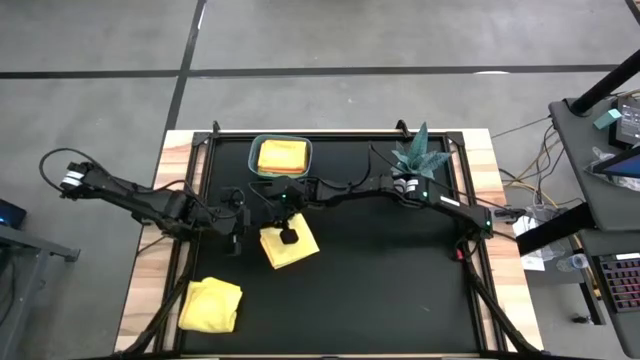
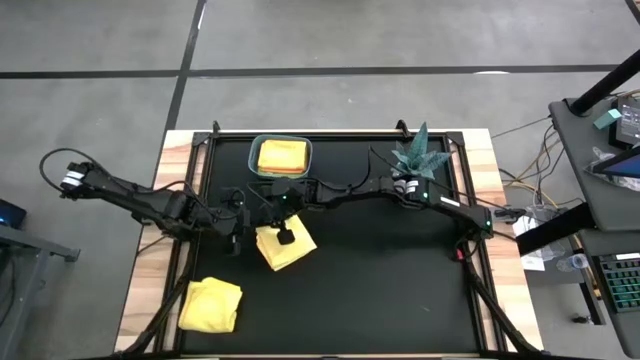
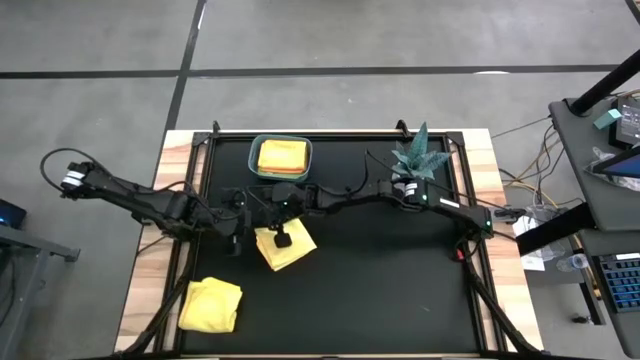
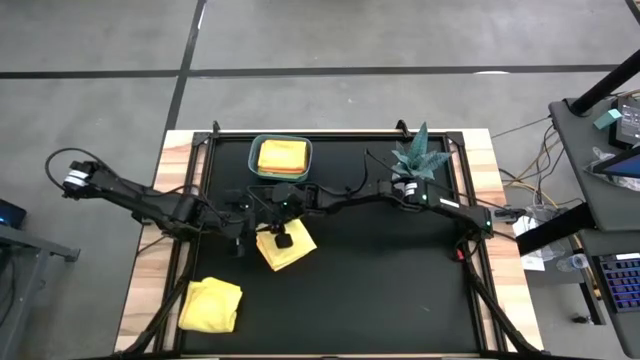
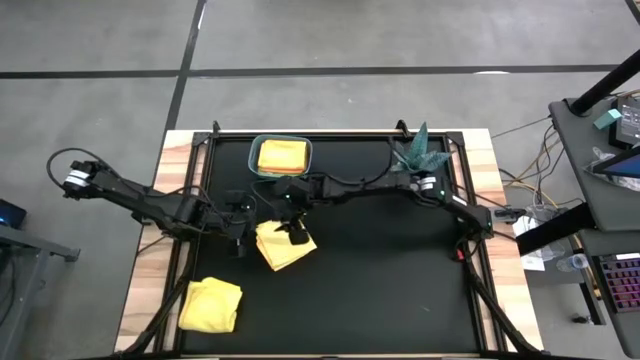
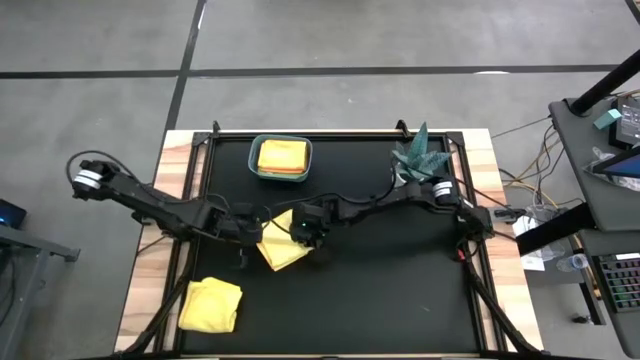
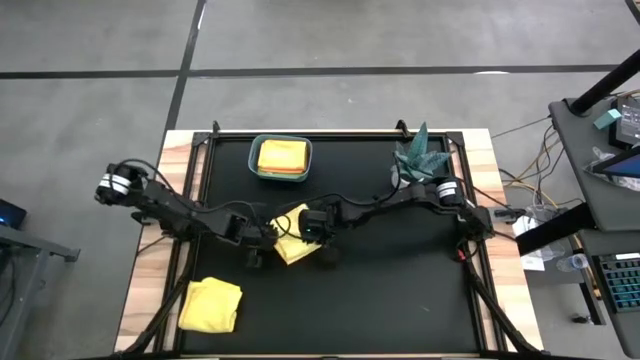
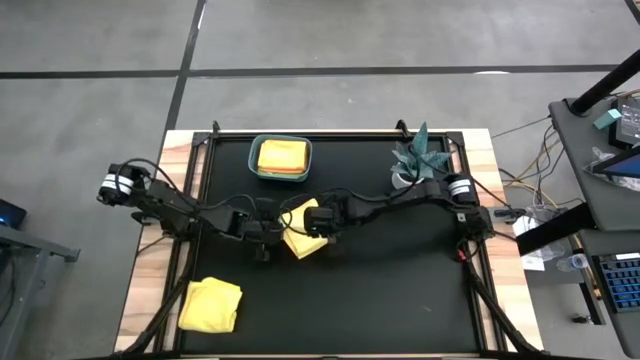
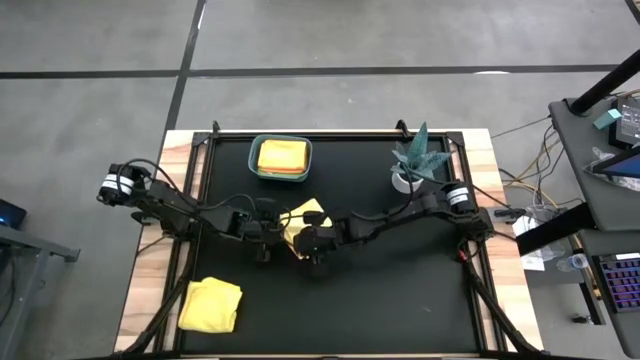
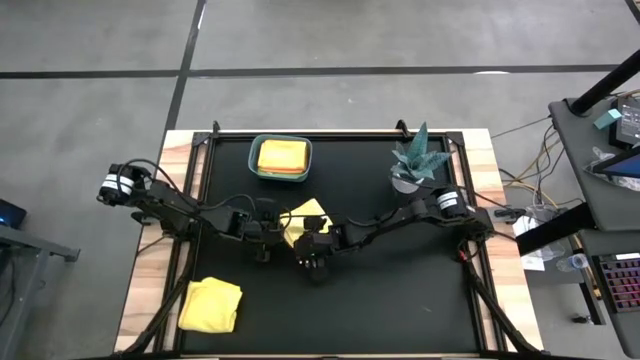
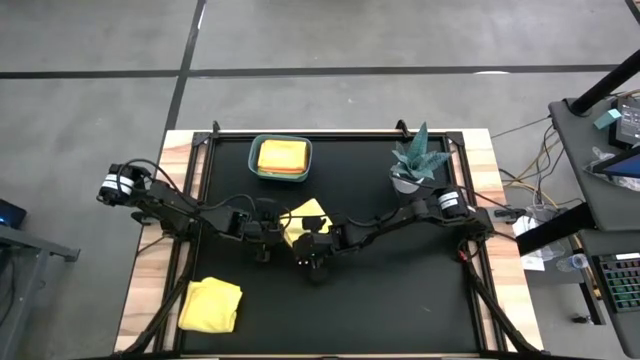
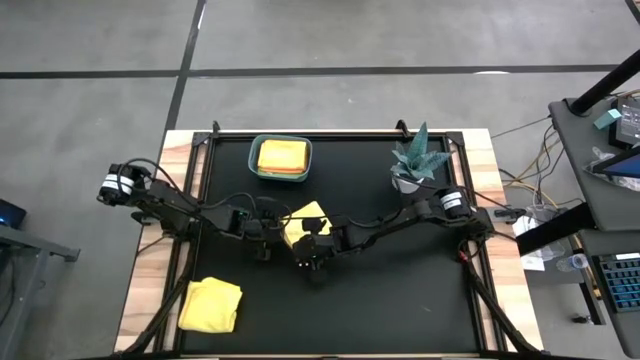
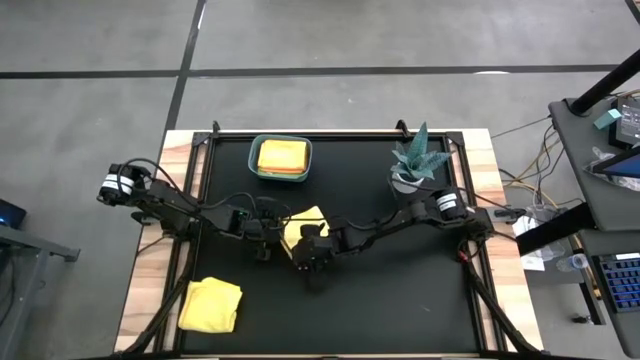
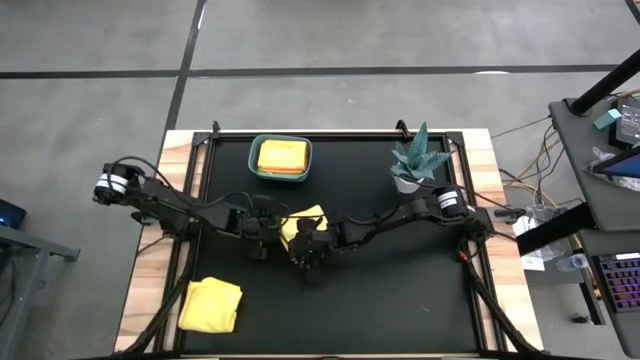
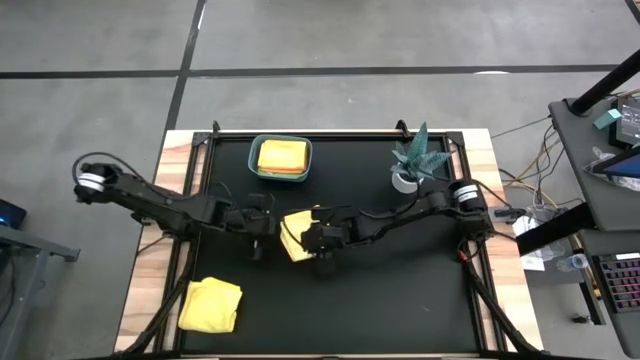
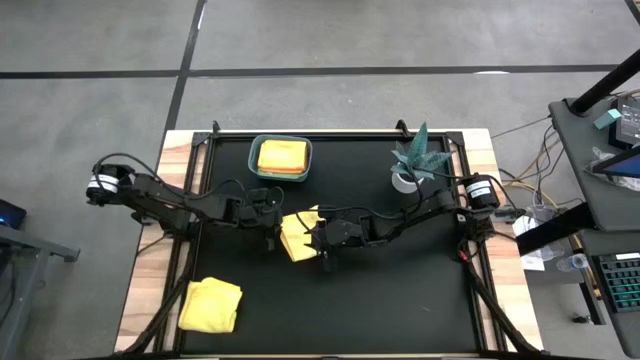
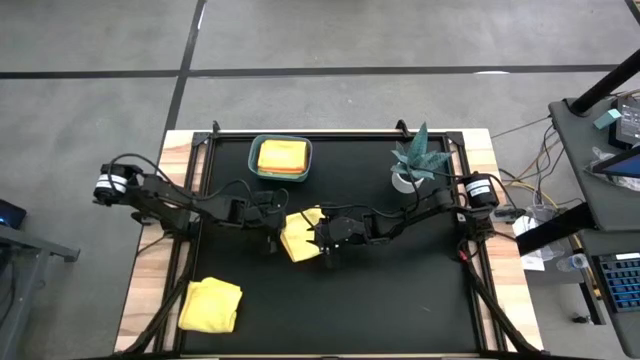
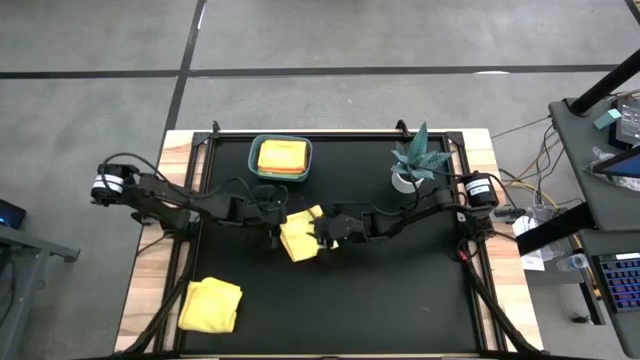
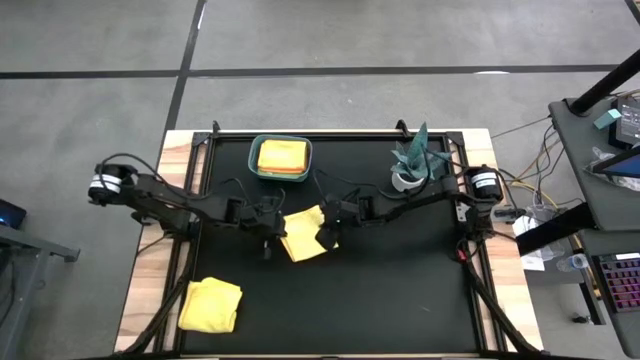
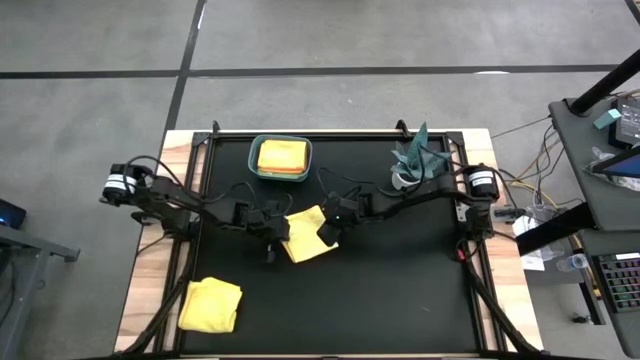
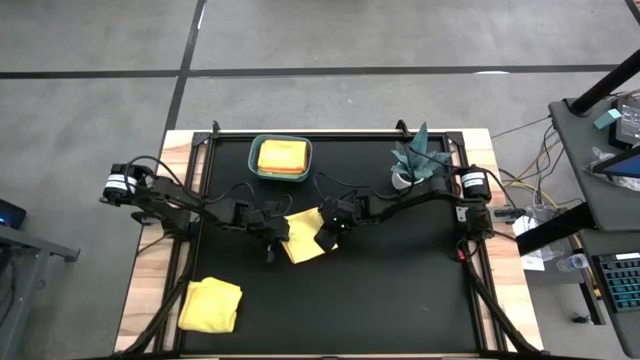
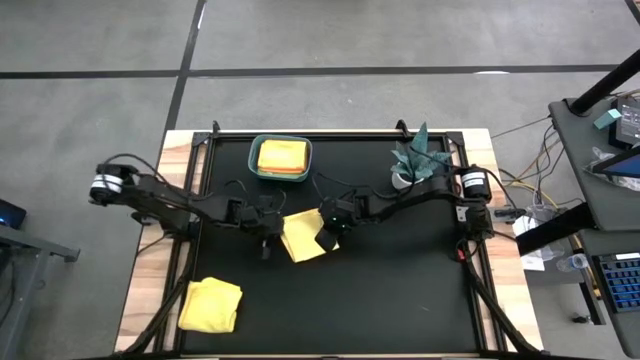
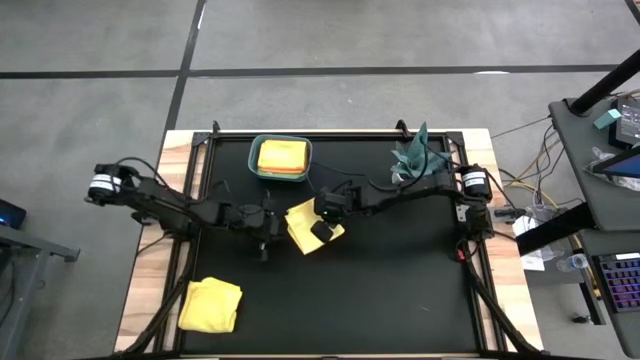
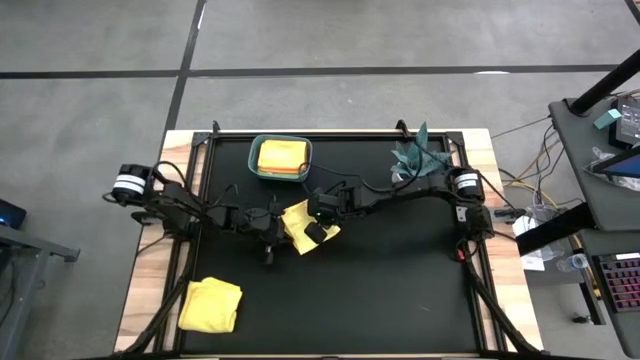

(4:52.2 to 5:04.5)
Task: Fold microfiber towels
Fold the right yellow microfiber cloth

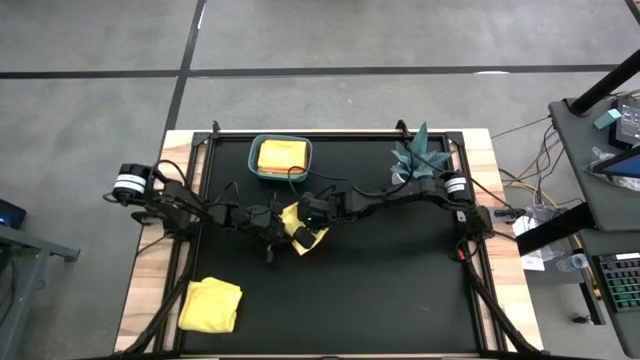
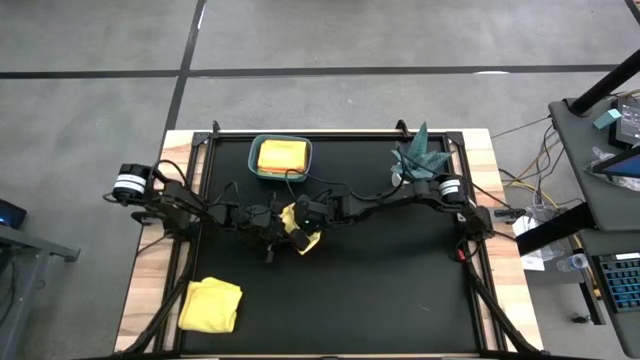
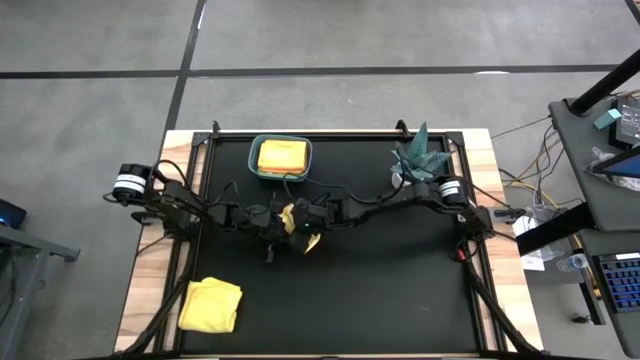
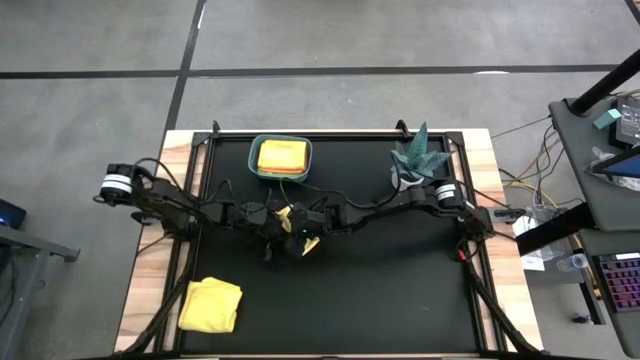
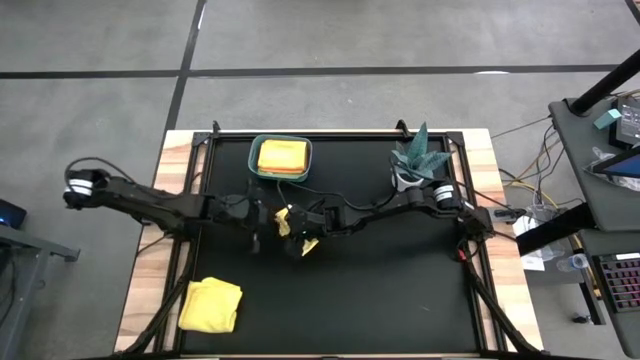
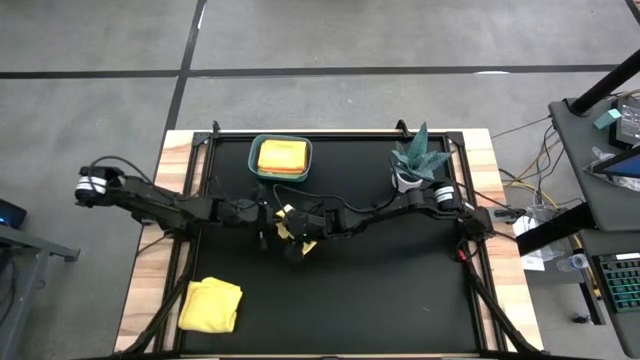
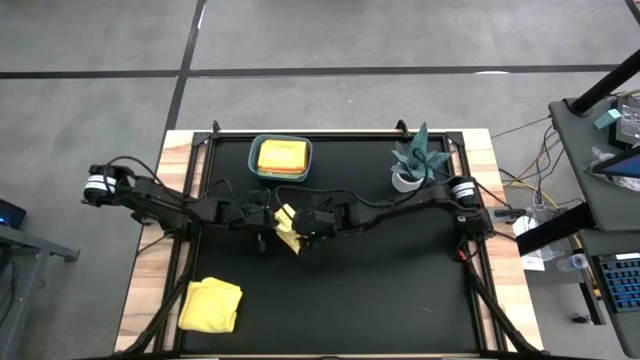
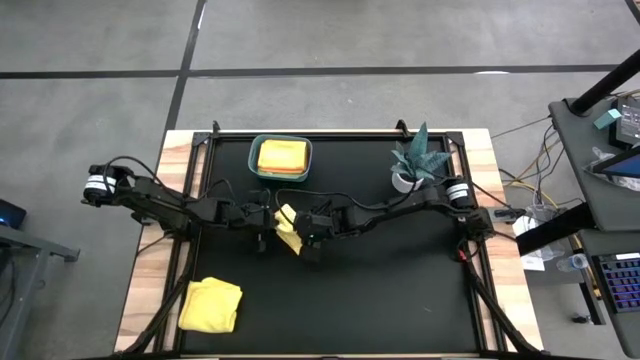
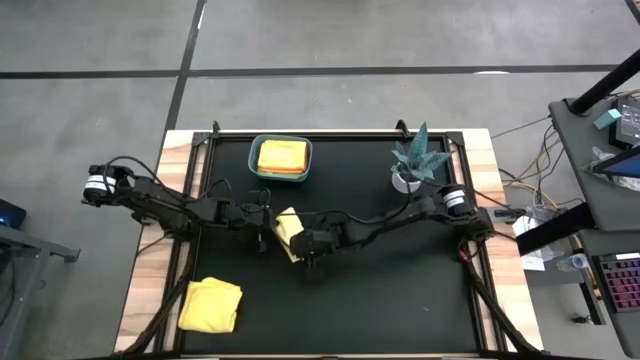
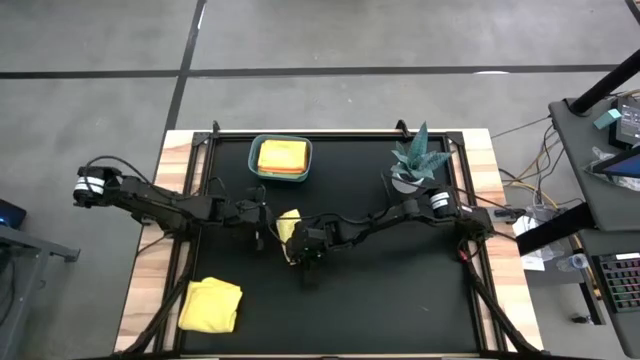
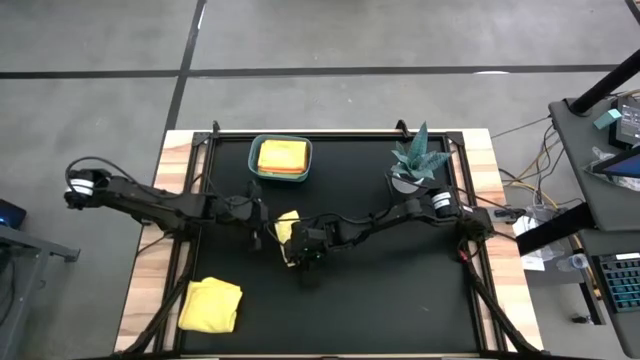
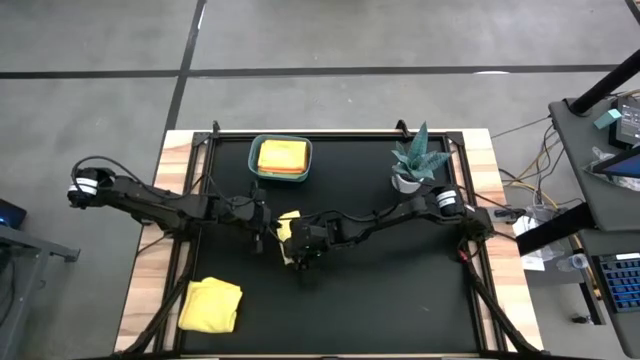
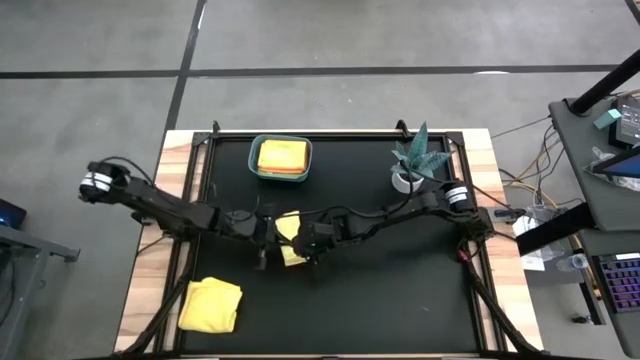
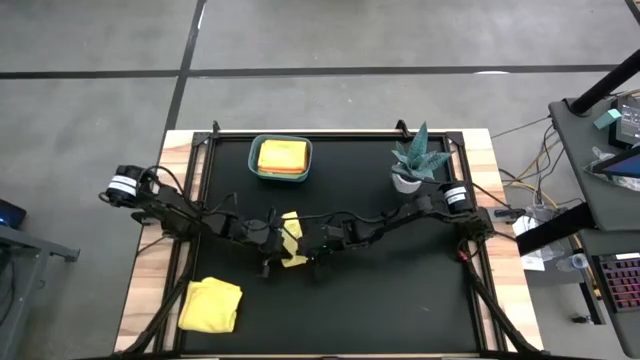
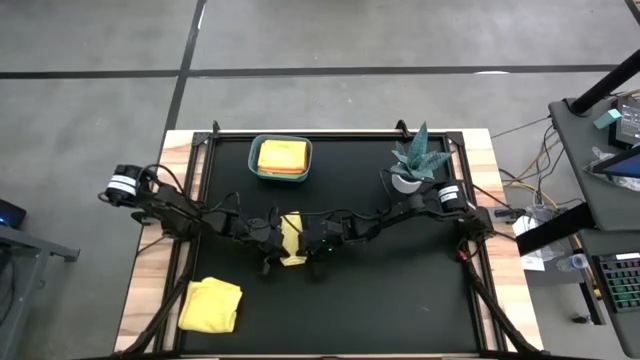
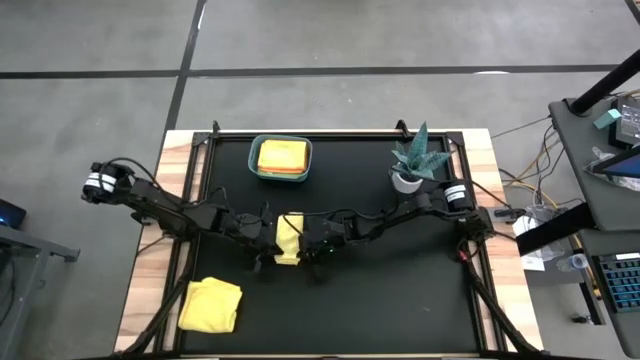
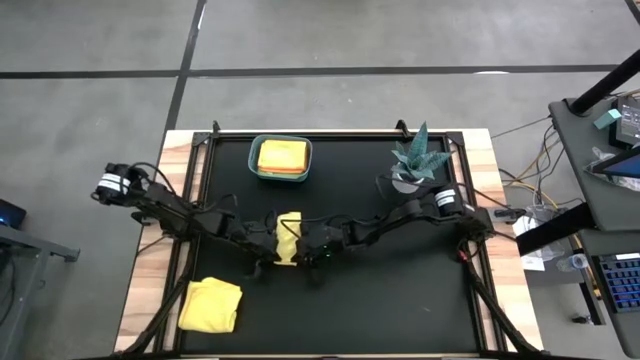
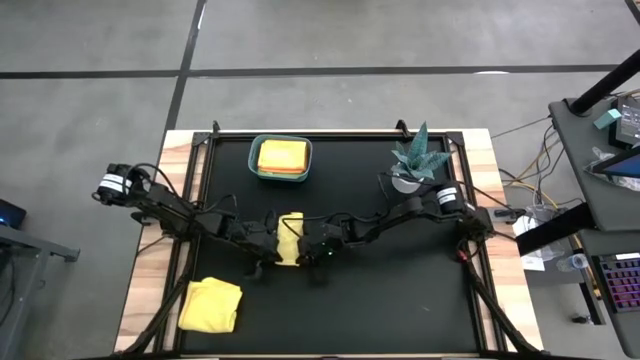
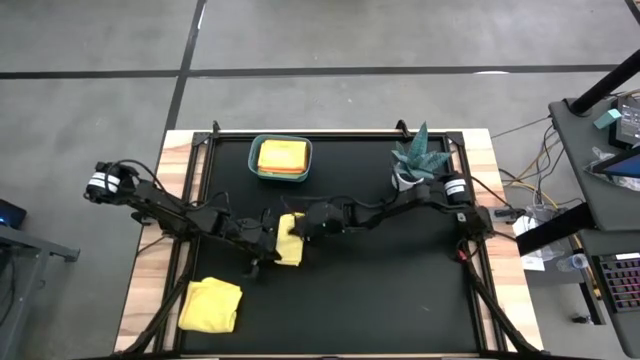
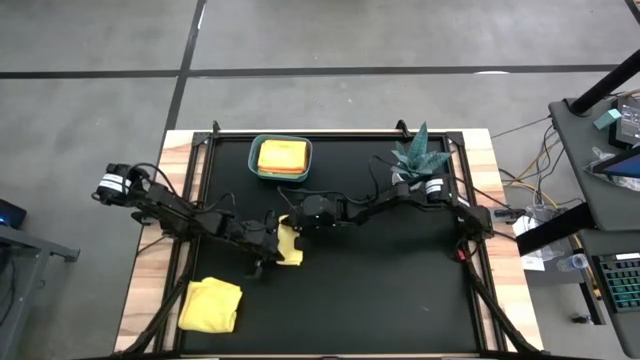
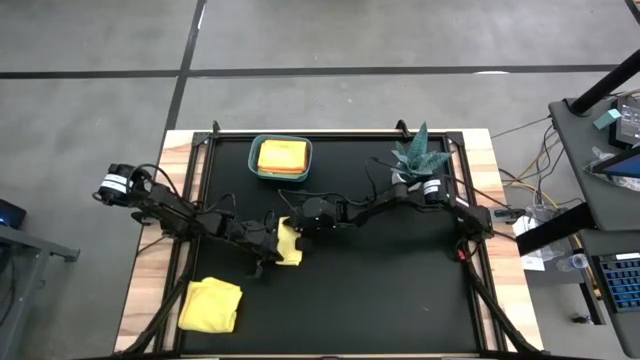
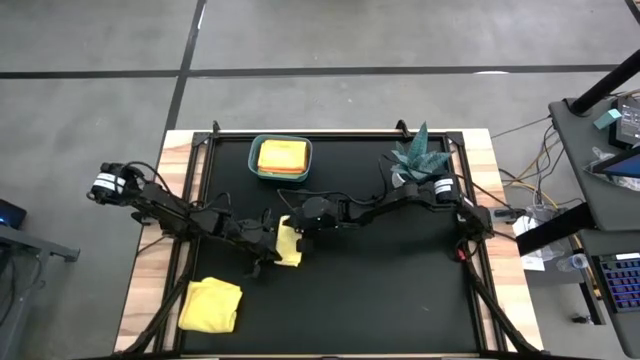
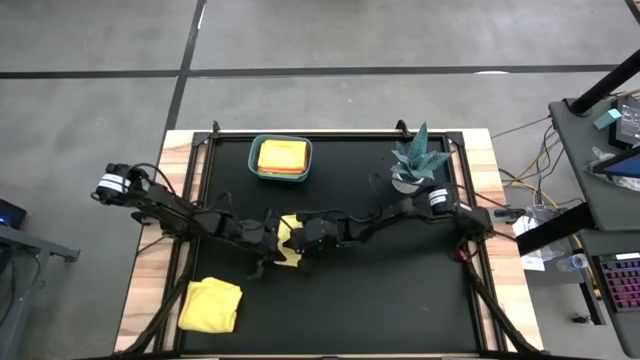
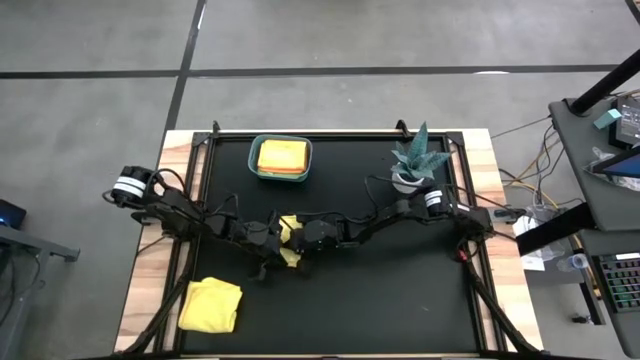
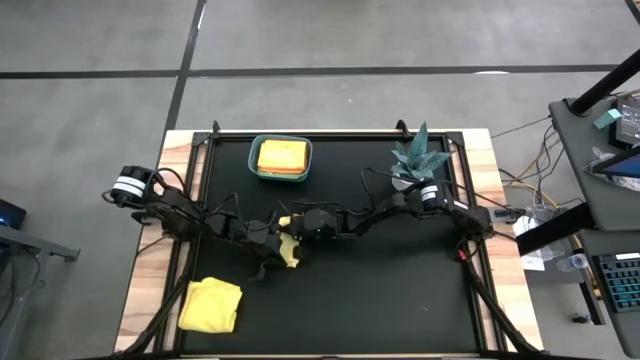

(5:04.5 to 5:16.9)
Fold the right yellow microfiber cloth
